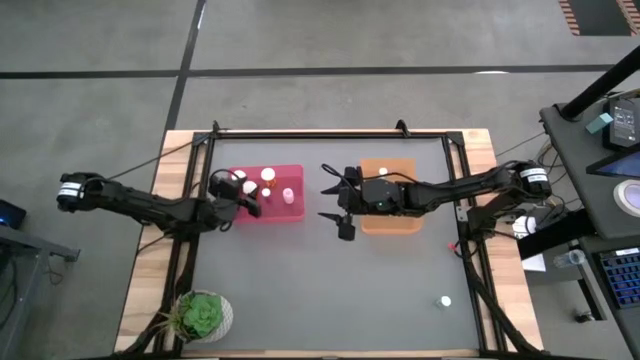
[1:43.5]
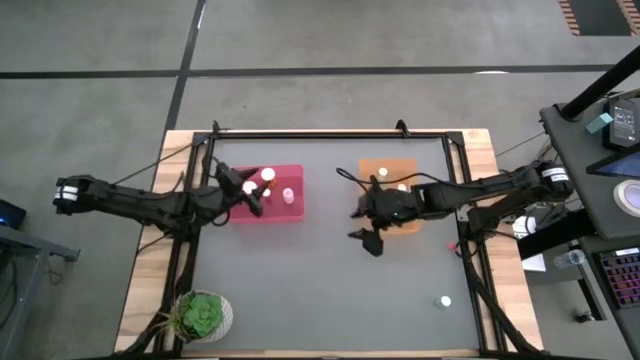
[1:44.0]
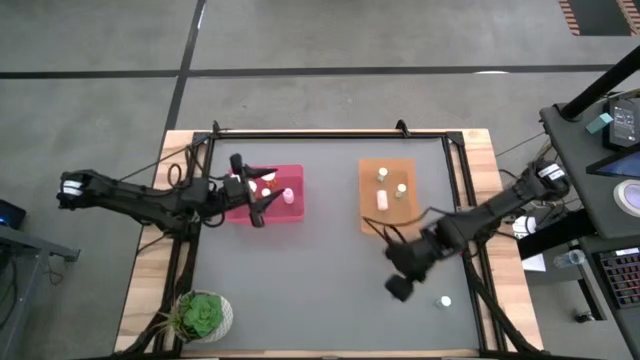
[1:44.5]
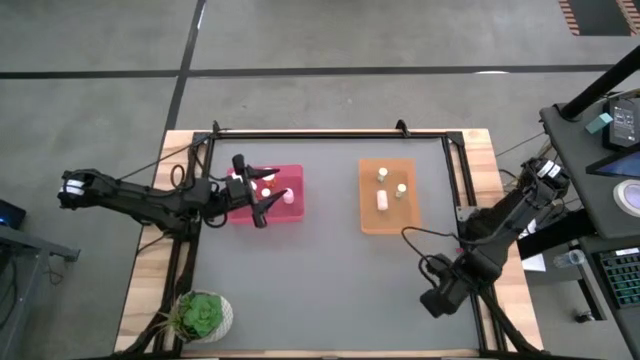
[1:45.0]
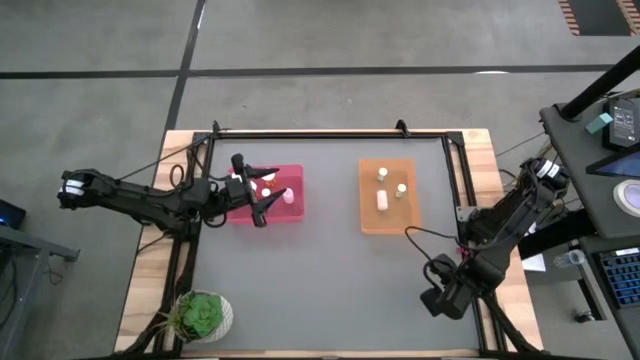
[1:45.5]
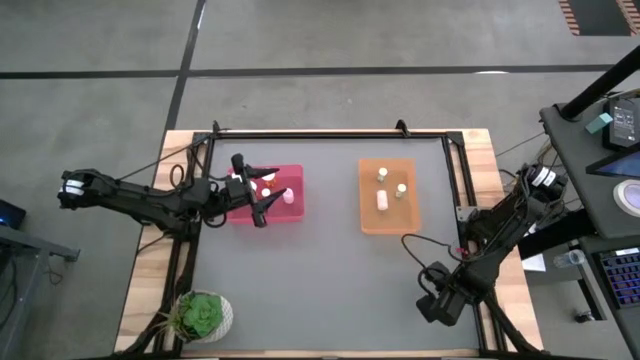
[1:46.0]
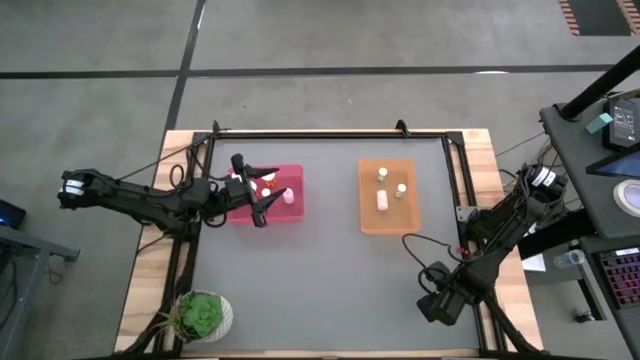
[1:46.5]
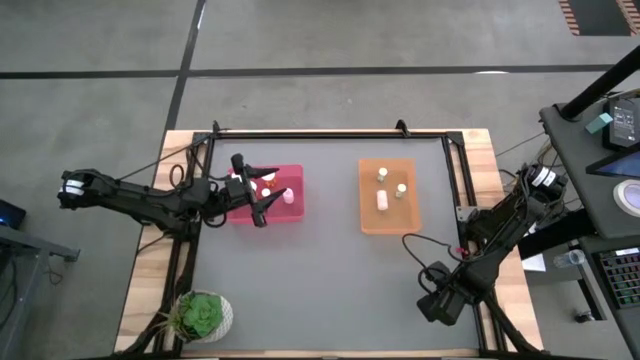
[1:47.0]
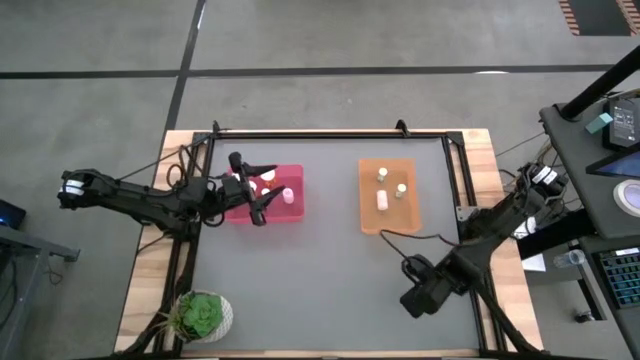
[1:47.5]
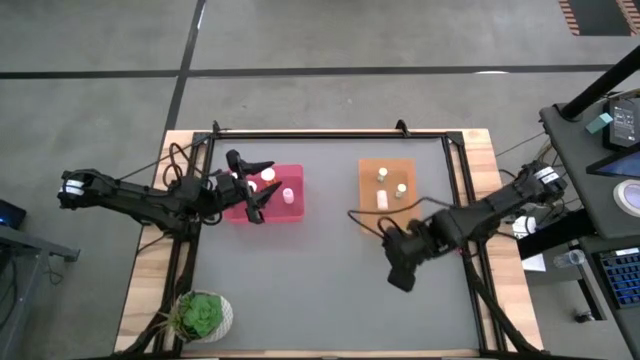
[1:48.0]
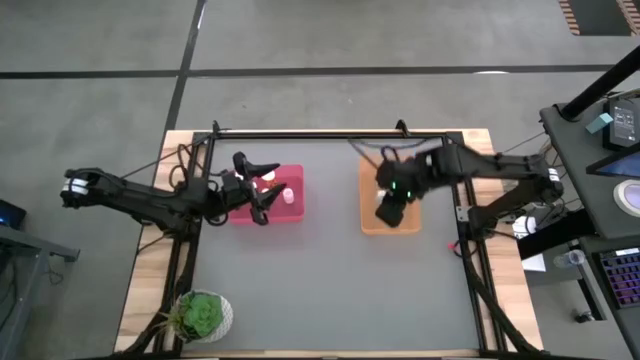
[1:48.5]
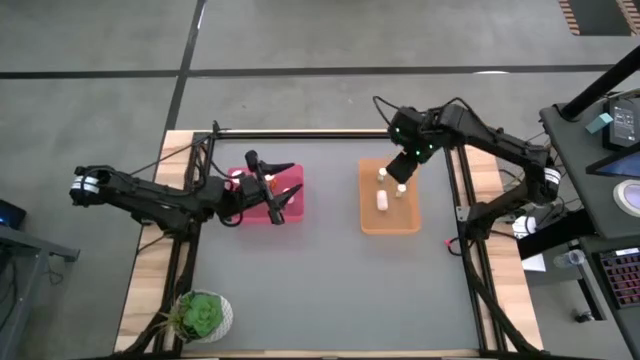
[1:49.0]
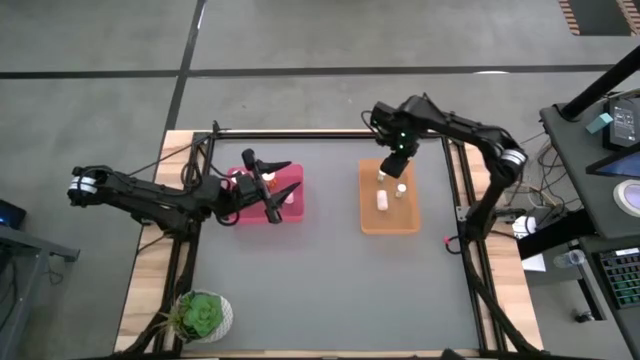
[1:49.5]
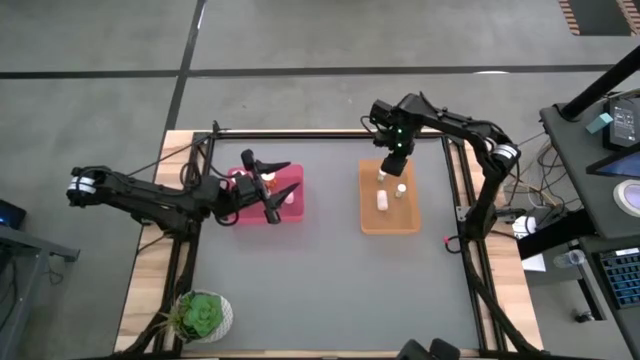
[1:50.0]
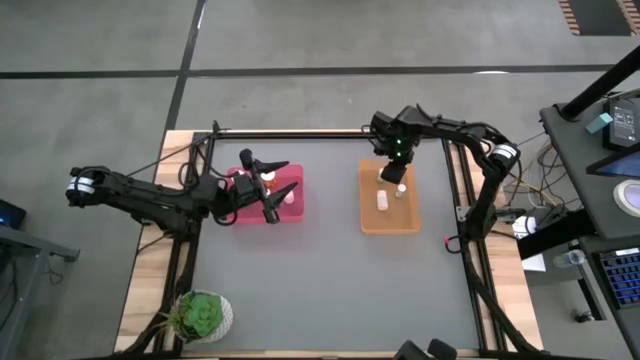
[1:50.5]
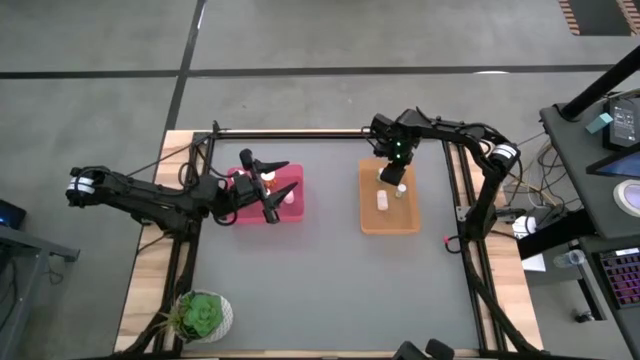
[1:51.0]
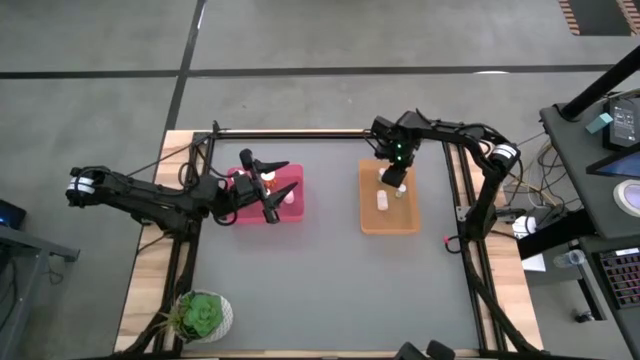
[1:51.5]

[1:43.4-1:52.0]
Task: Pick and place medicine bottles into bin by pill shape (circle, oval)
Put the blue pill into the orange bin

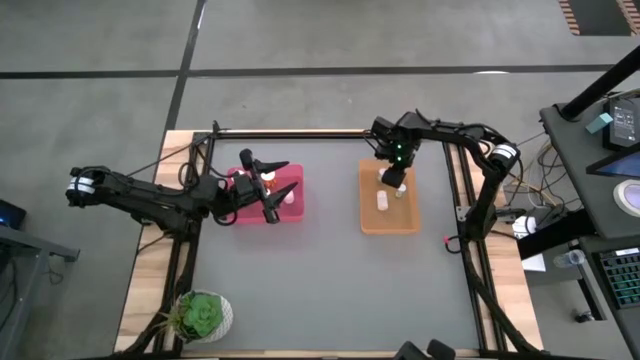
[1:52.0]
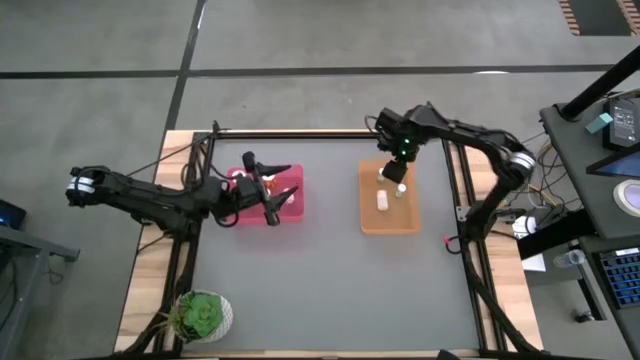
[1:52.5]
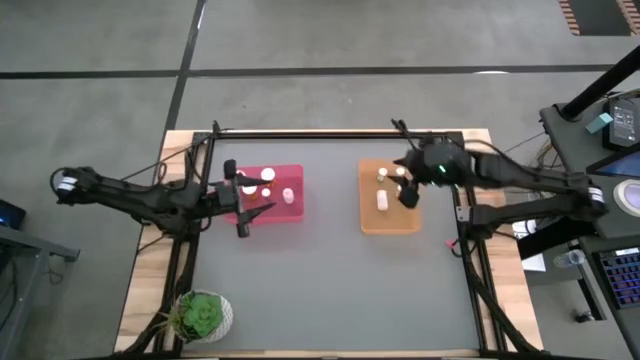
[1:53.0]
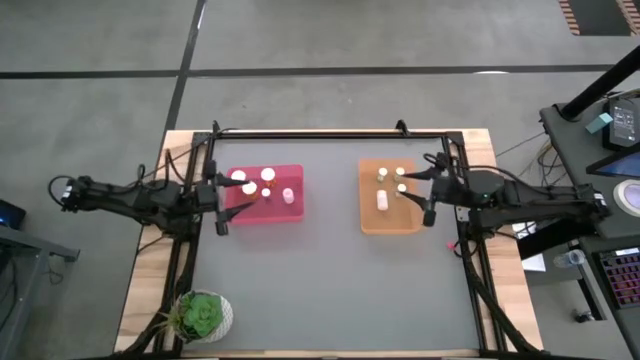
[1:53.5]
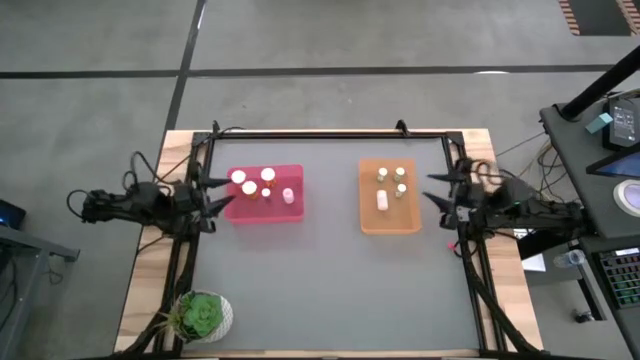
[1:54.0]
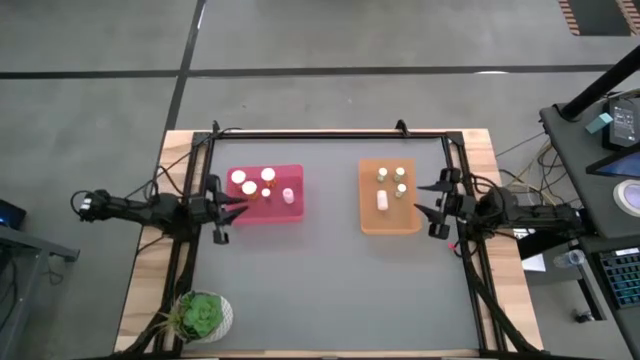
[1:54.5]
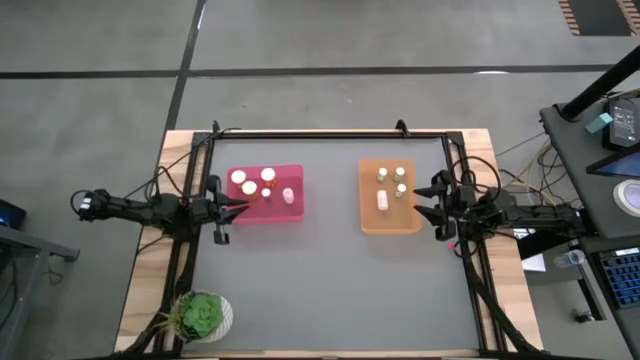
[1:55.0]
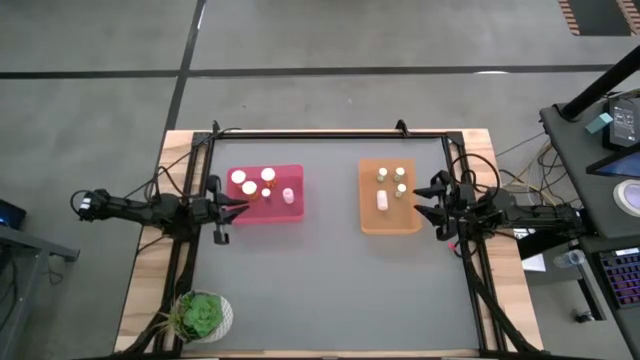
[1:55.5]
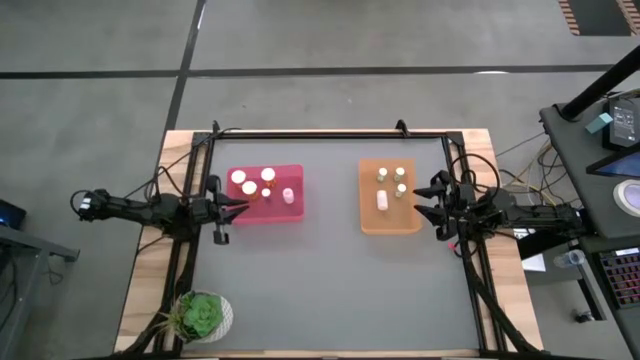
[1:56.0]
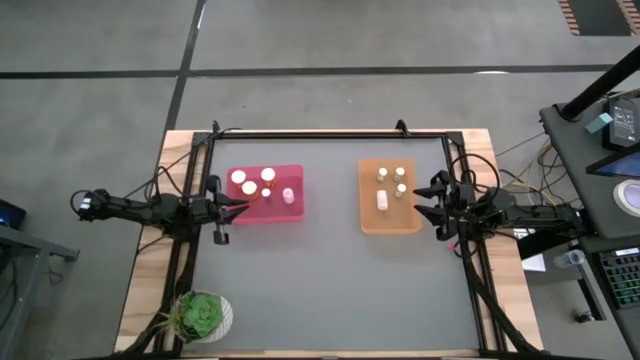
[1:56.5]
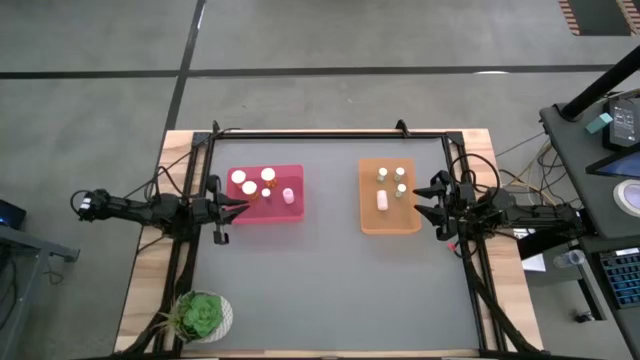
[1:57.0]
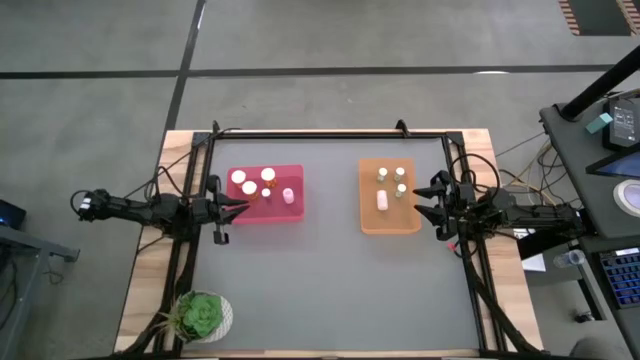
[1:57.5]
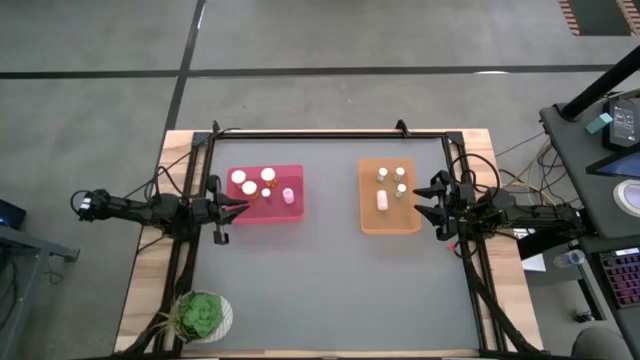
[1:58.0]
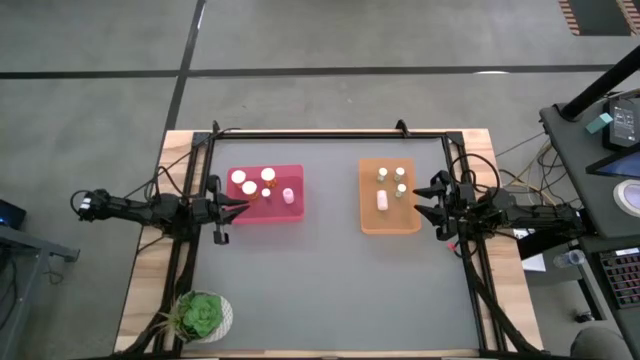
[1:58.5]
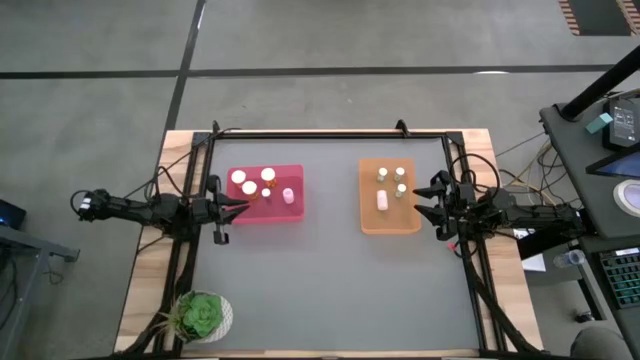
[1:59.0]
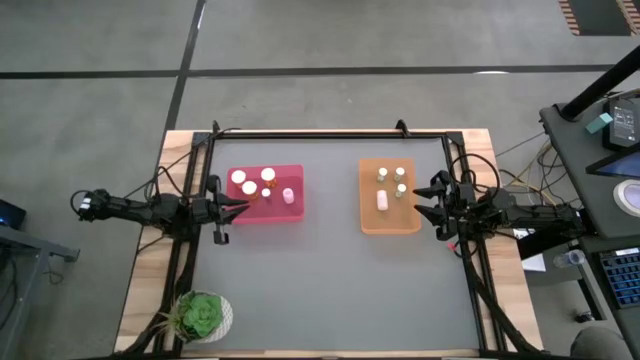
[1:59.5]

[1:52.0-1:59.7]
Return to Home Position

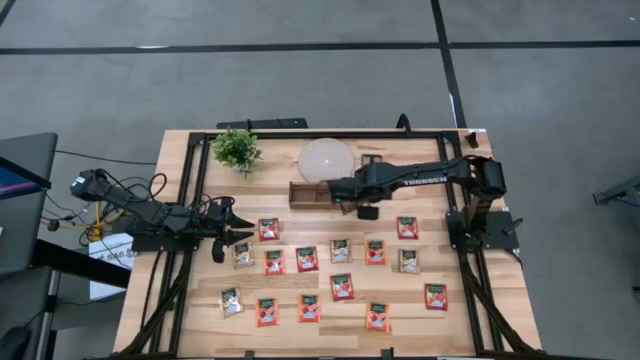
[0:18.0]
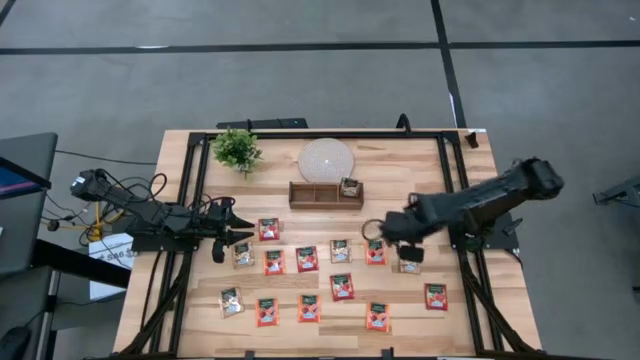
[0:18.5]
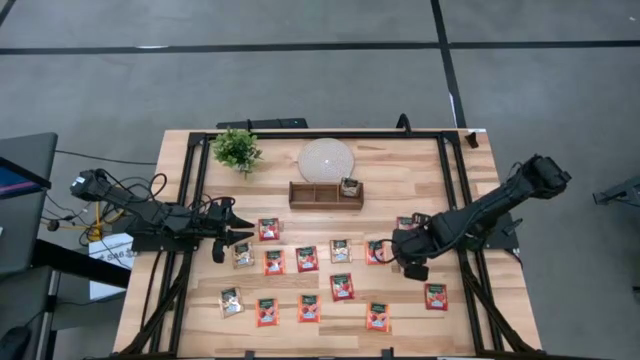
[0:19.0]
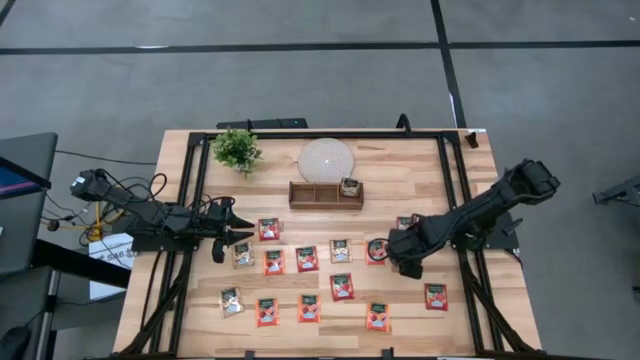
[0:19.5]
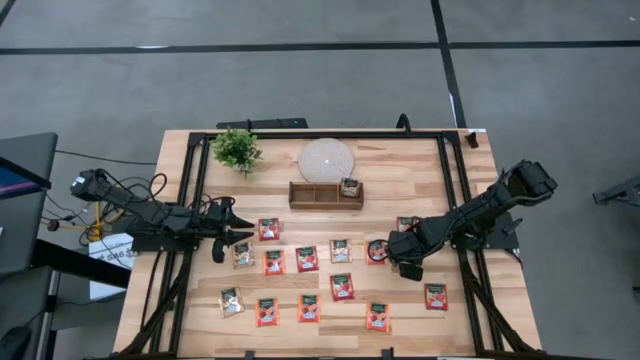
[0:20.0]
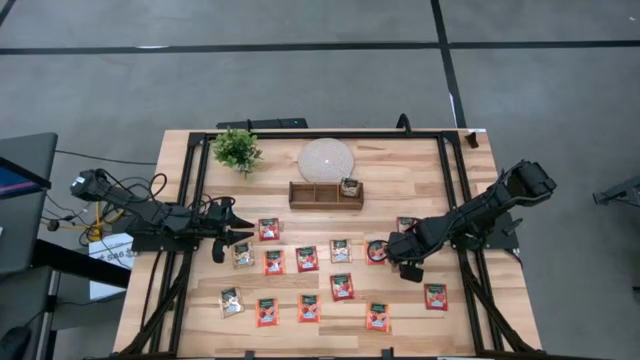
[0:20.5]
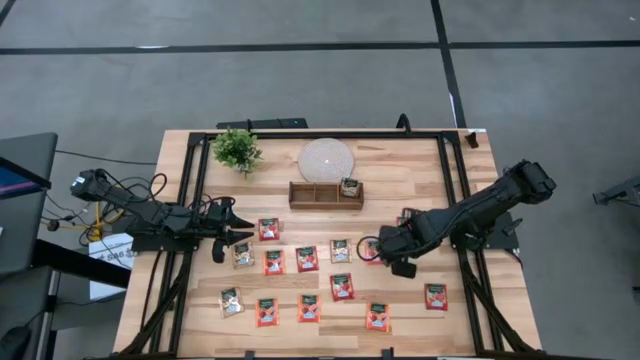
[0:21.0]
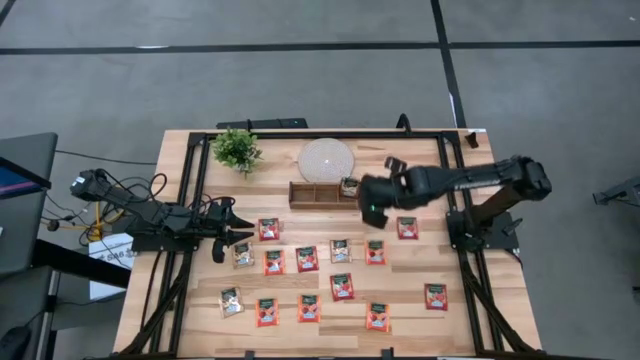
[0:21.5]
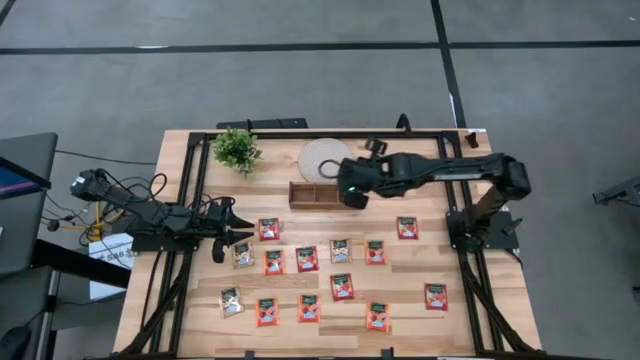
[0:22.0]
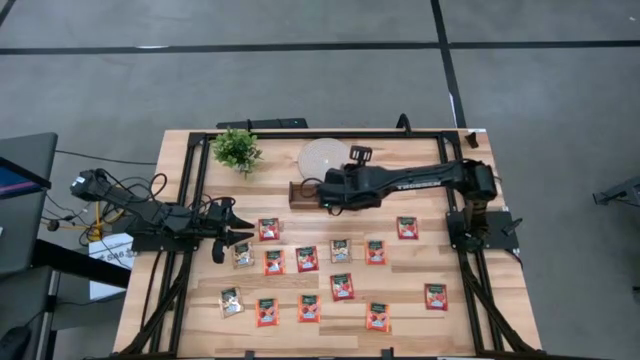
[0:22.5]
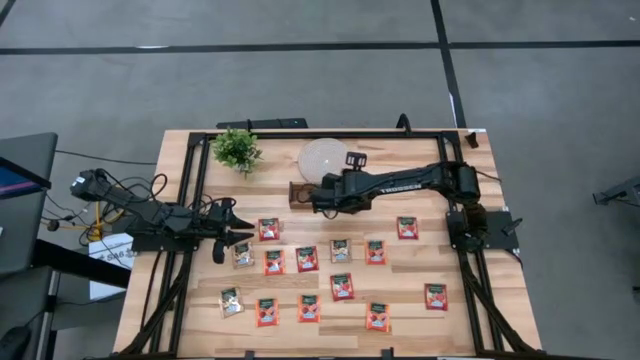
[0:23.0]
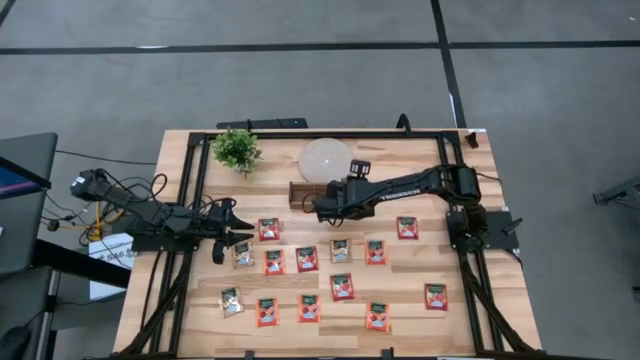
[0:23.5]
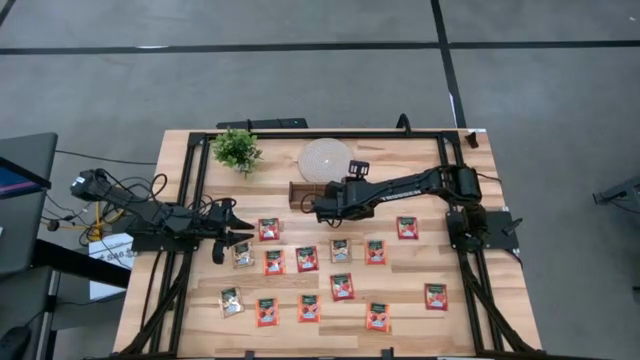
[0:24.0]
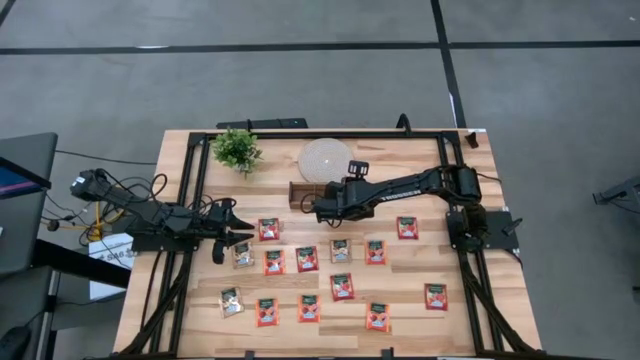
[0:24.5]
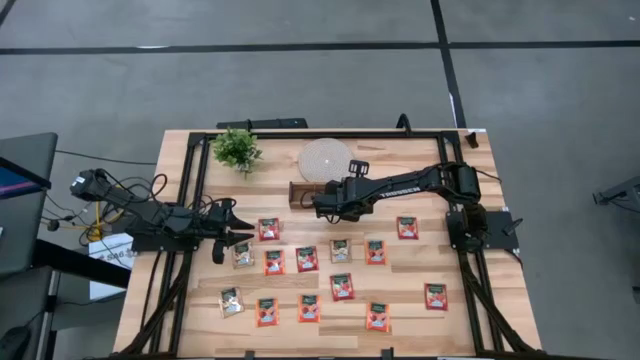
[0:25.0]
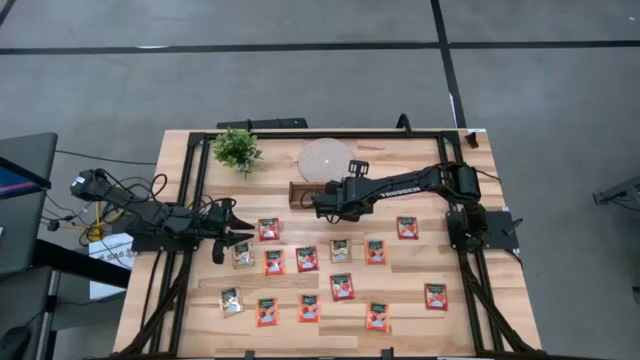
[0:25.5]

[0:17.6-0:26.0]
Task: Pick & Place Tea
Put the brown tea bag into the right section of the wooden organizer
